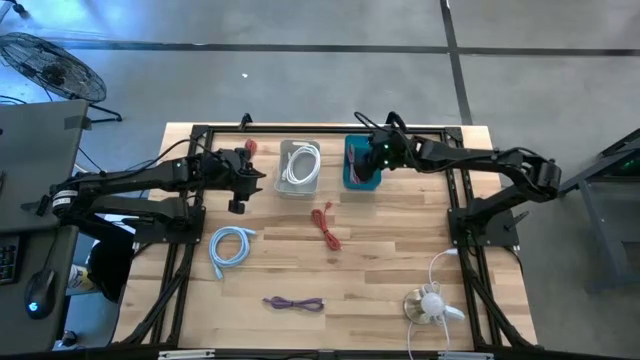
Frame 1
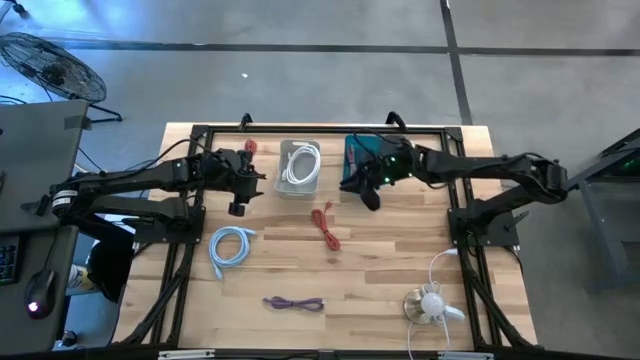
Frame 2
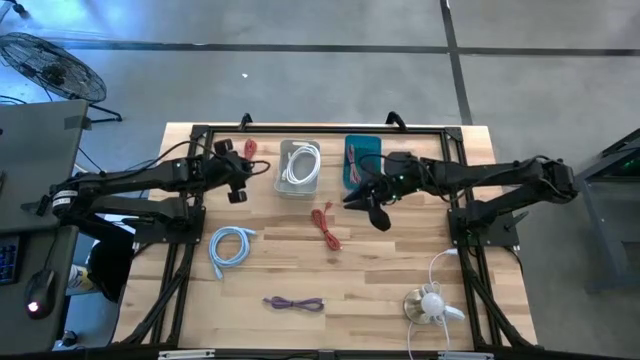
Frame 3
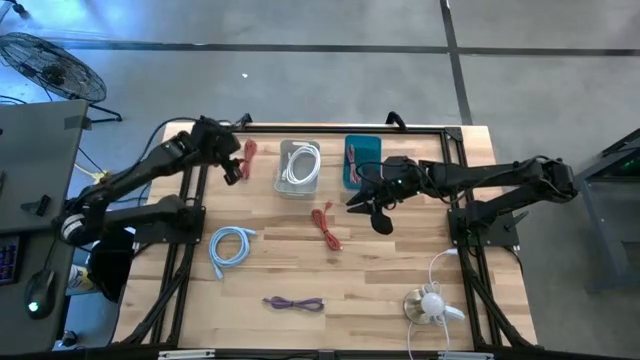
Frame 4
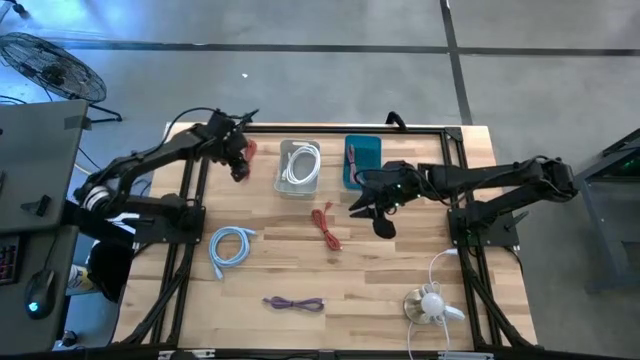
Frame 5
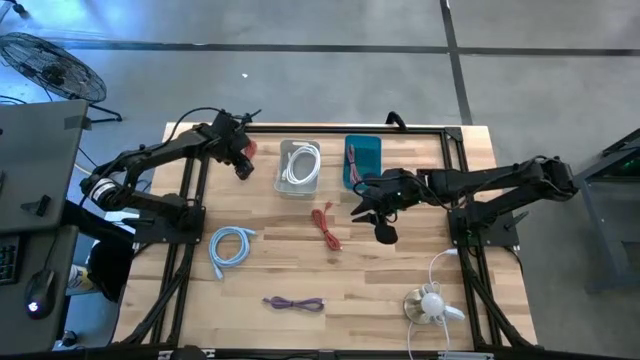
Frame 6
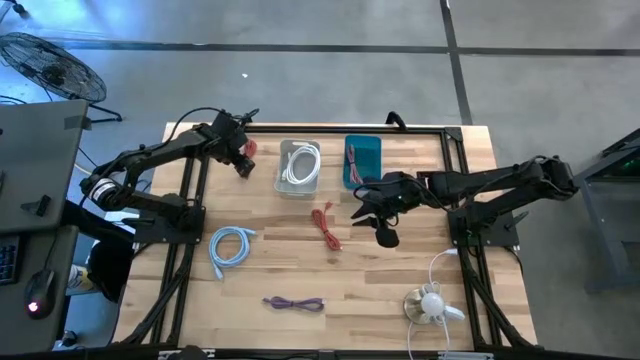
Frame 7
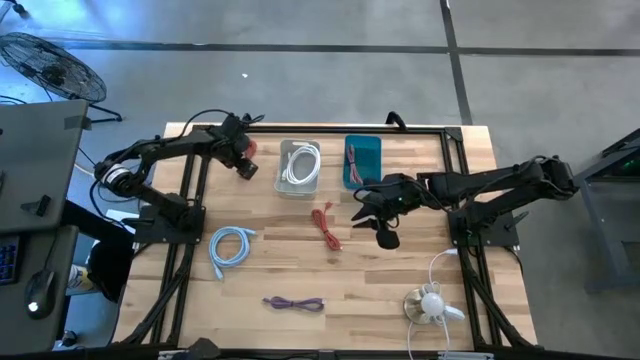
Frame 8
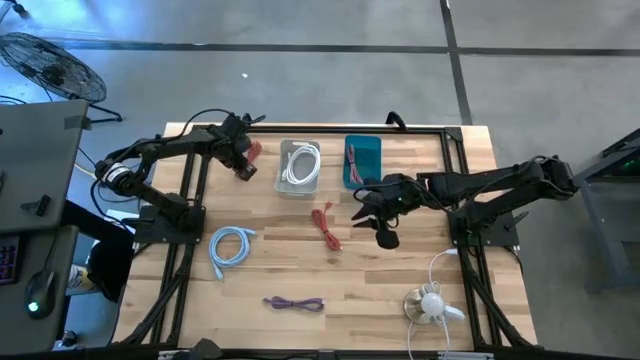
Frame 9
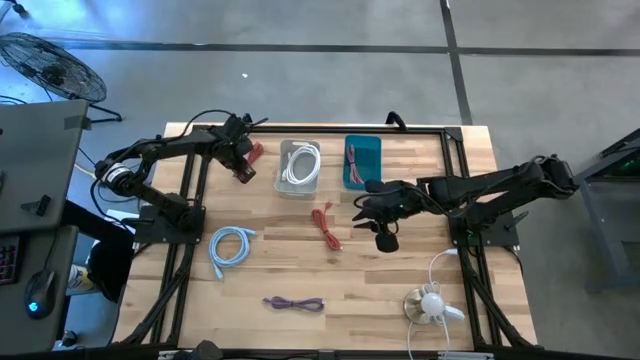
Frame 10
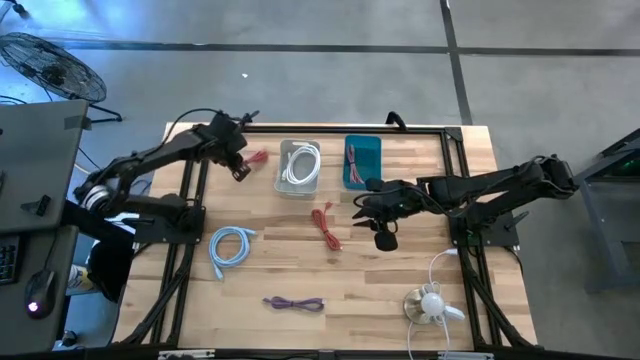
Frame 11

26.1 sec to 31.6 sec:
Task: Pick & Place USB Port
Put the top orange charger cable into the blue bin

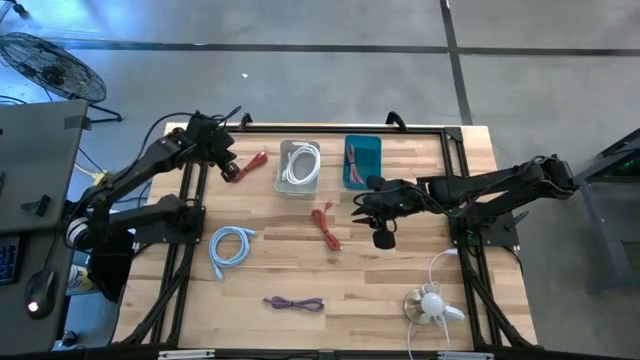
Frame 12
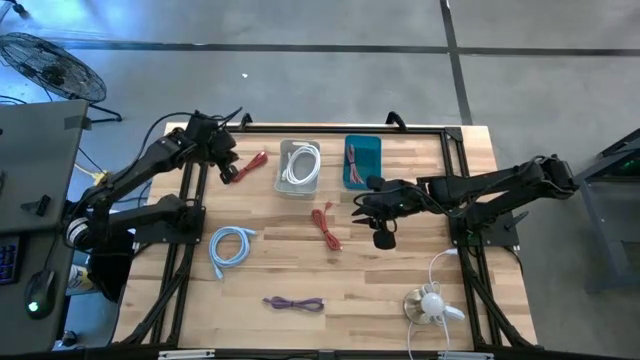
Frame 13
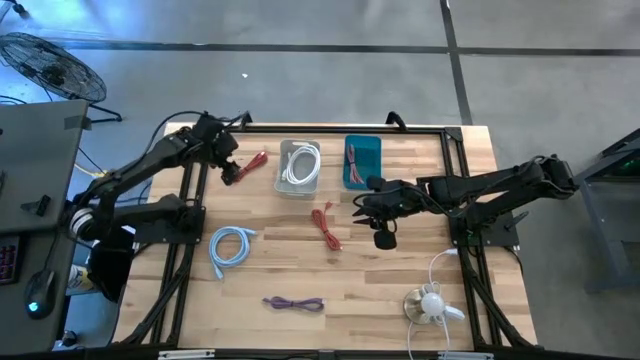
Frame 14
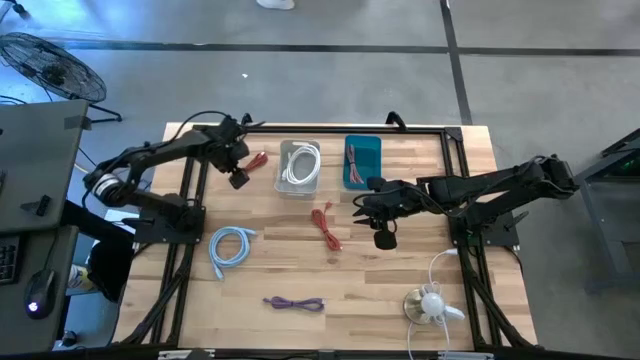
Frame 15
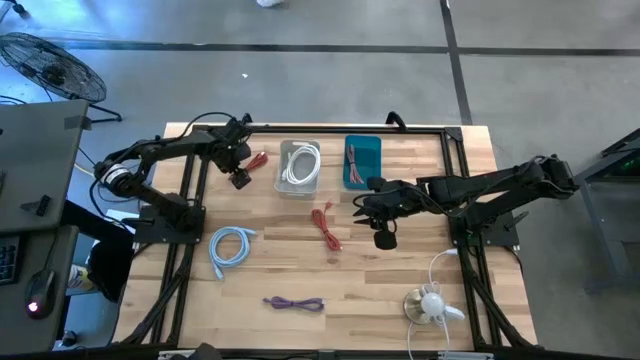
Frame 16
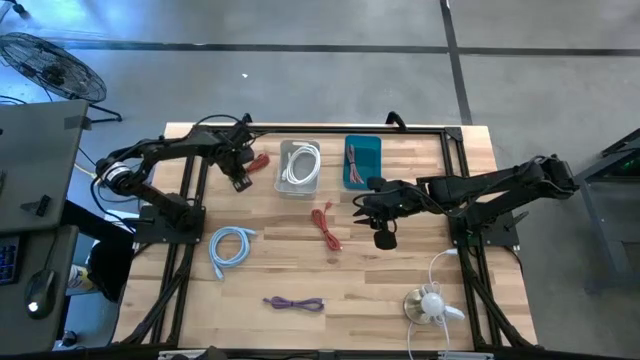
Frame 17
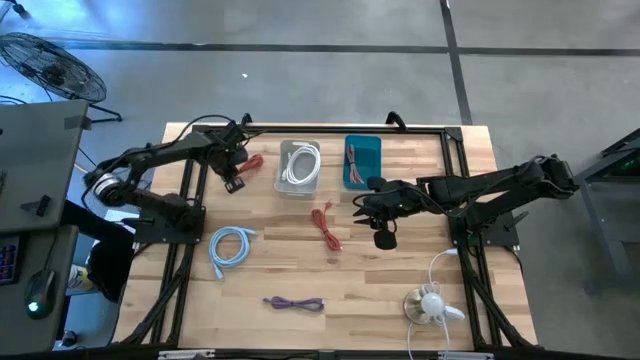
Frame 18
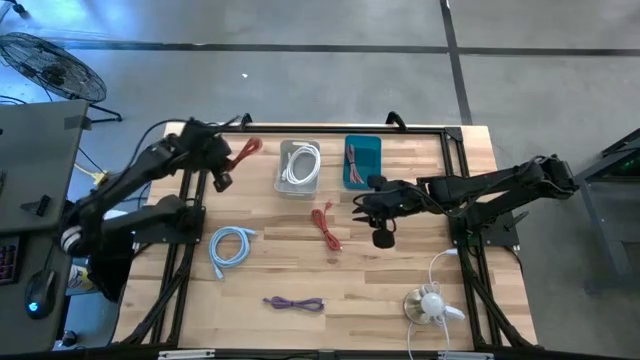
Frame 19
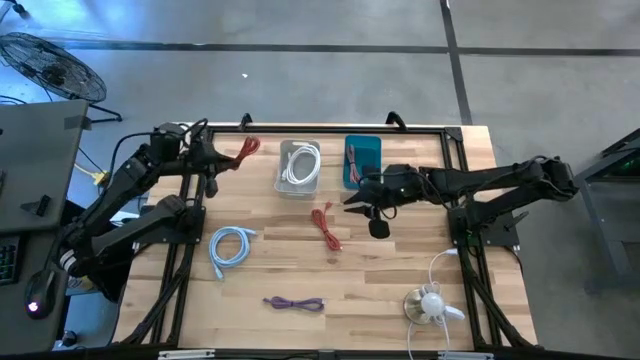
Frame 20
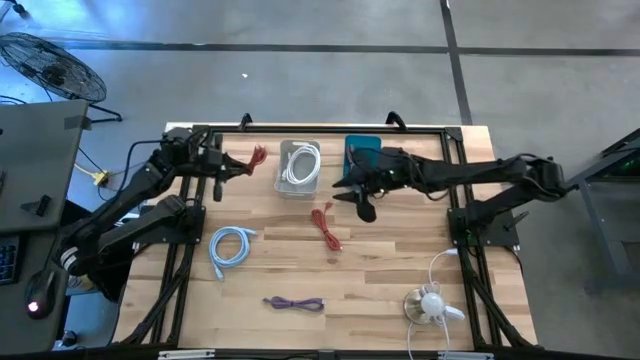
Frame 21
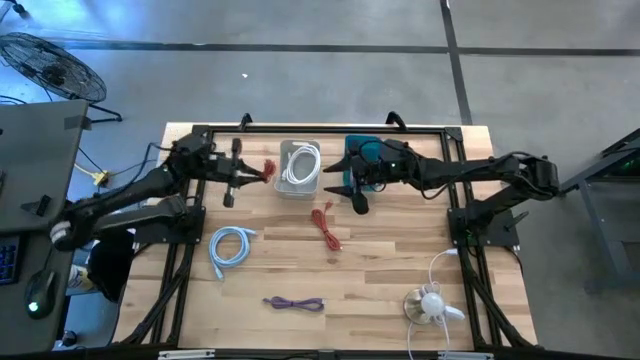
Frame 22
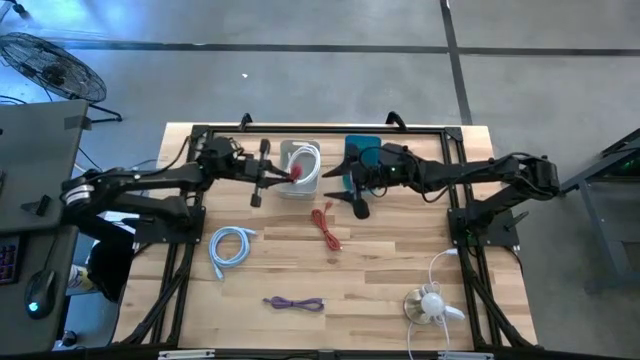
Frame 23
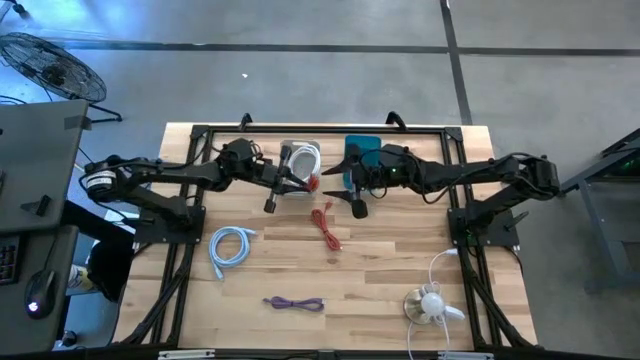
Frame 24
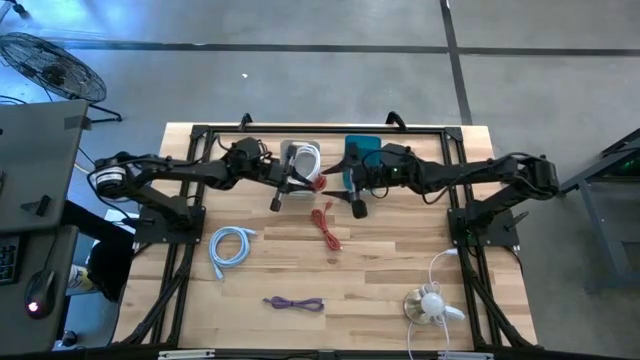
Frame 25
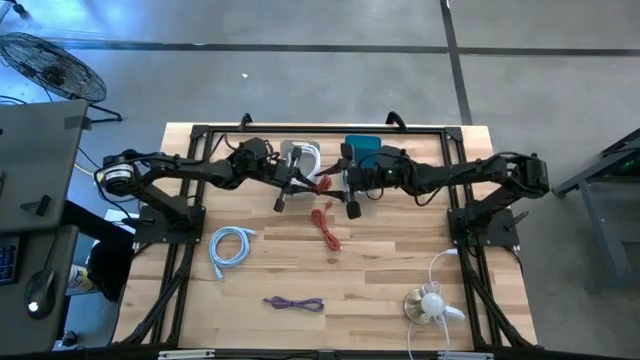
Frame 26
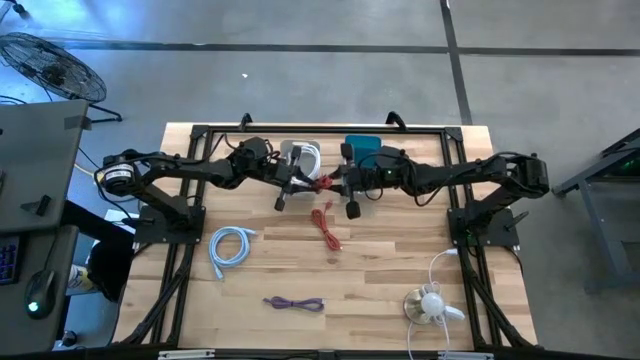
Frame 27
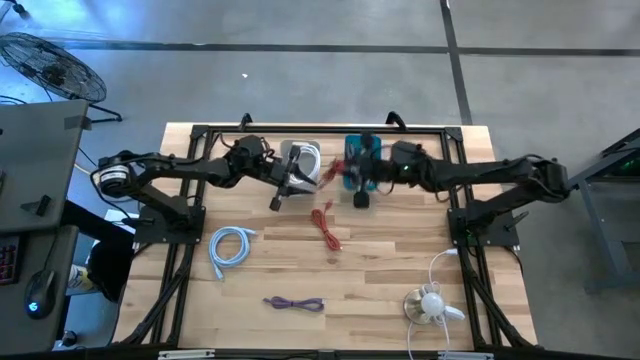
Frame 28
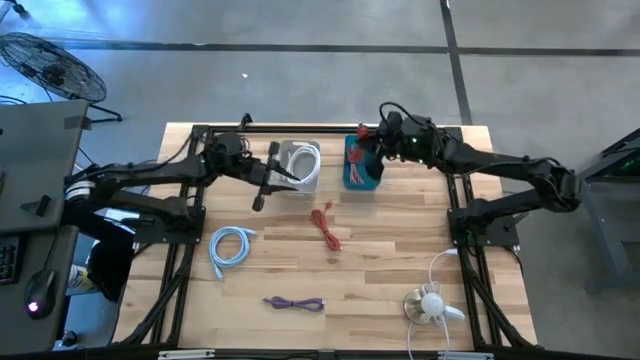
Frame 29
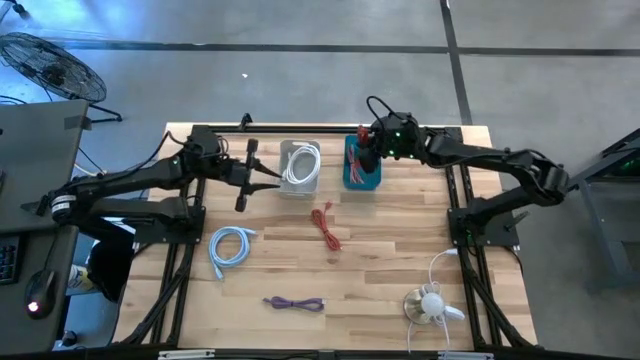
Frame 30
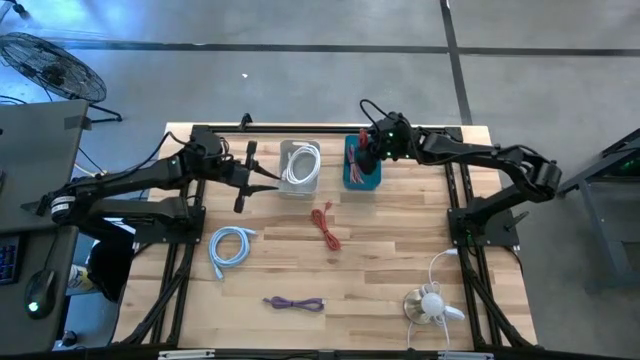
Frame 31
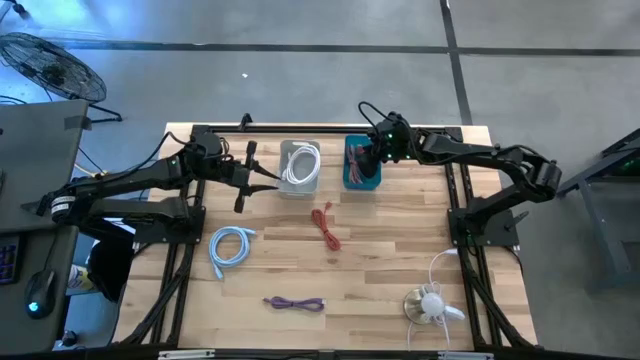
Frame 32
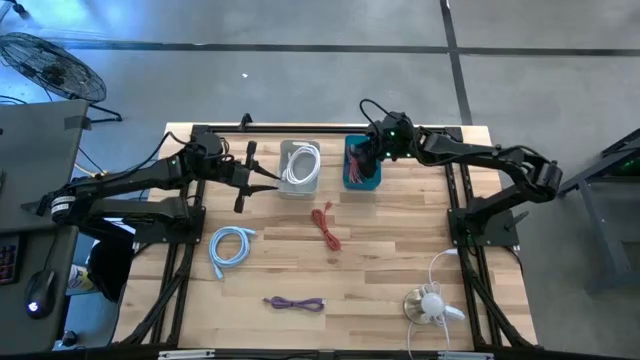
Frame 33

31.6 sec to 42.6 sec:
Put the top orange charger cable into the blue bin

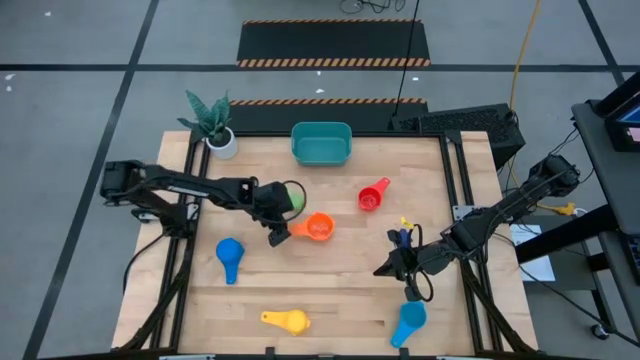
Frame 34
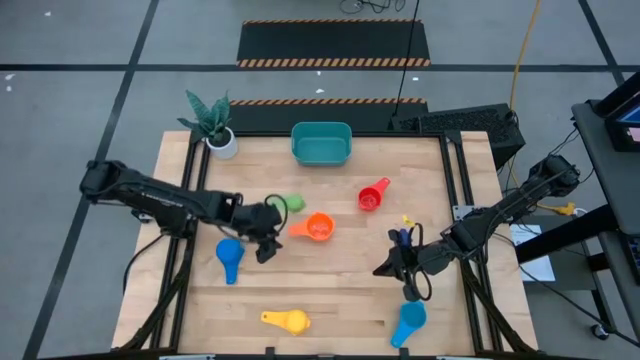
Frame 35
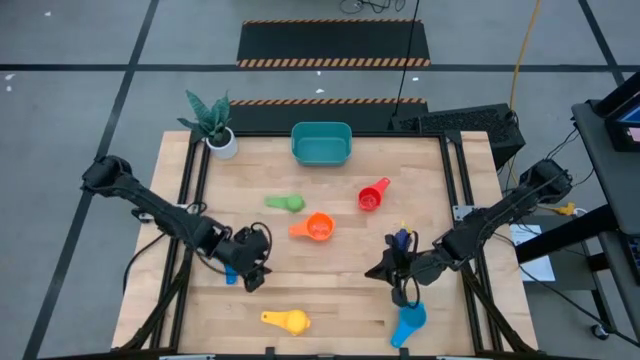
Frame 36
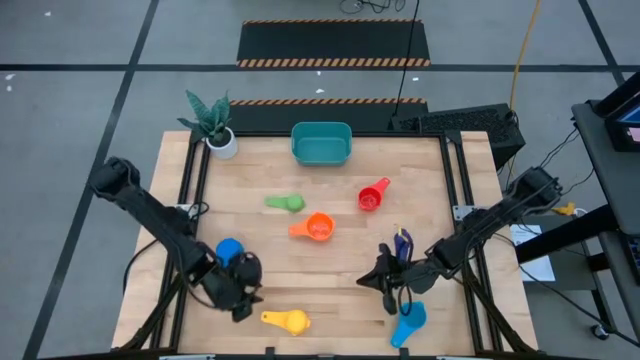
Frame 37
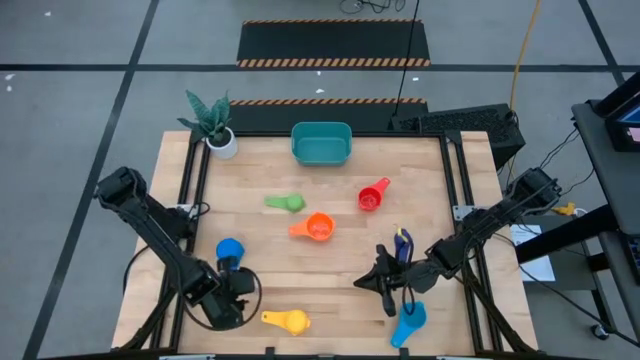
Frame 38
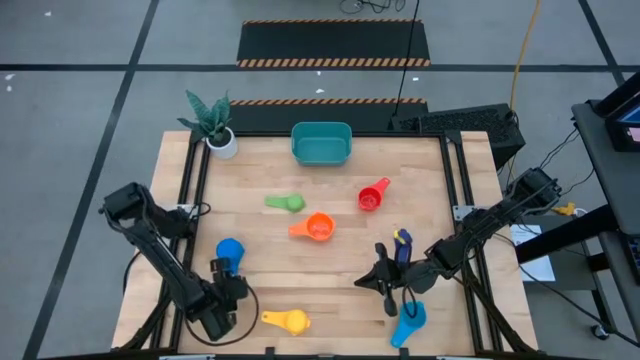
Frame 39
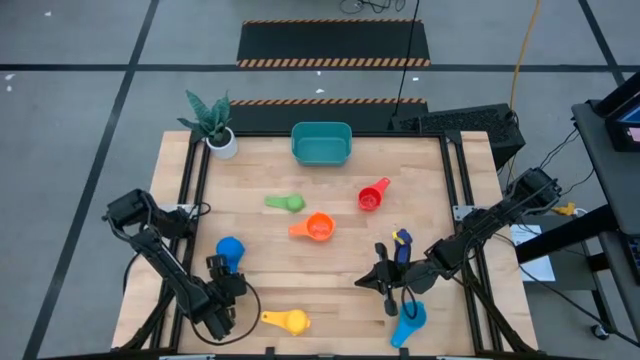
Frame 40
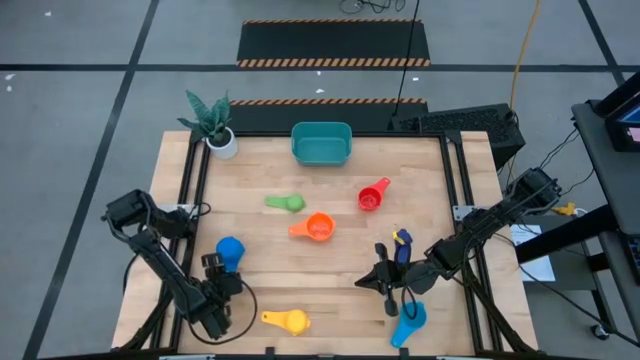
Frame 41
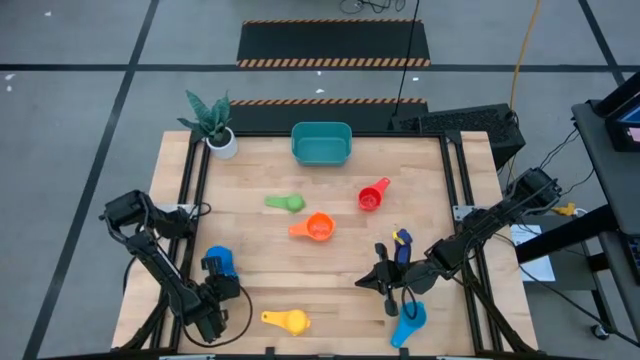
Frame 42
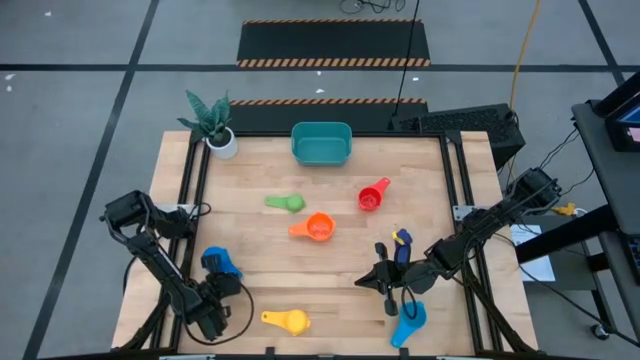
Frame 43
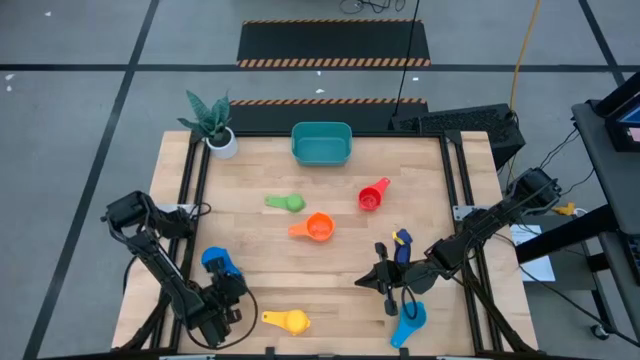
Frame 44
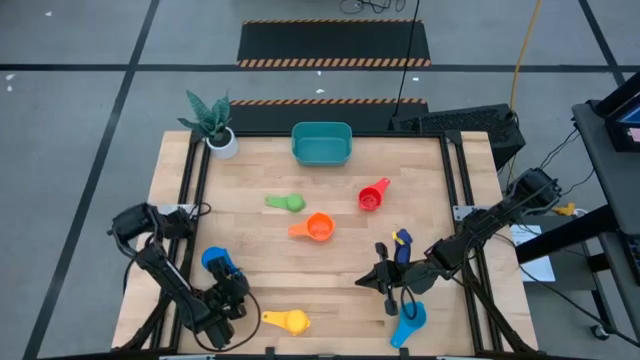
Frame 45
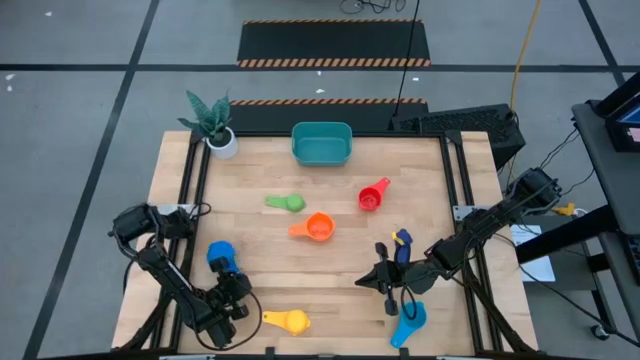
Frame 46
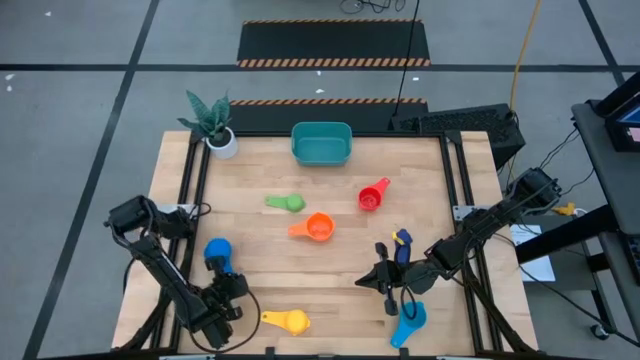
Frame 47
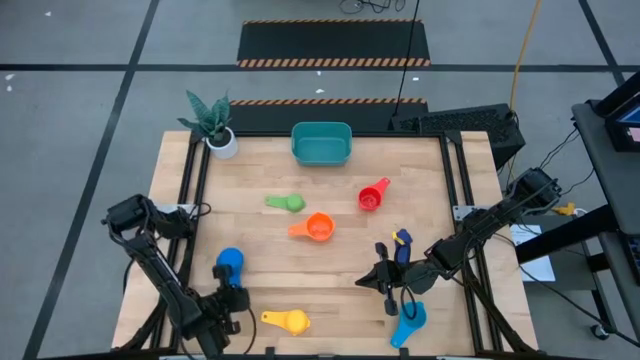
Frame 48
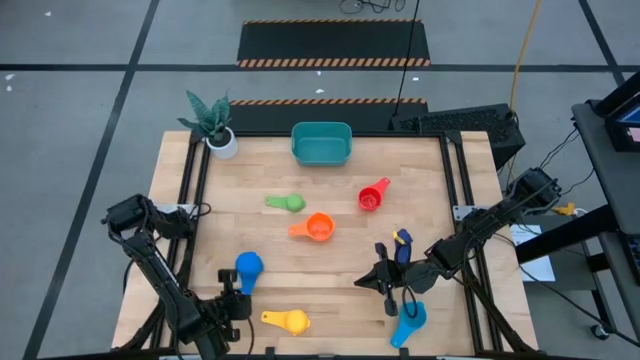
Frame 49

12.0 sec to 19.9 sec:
Task: Nest measuring cups in basket
Stack the blue measuring cup on top of the orange measuring cup
